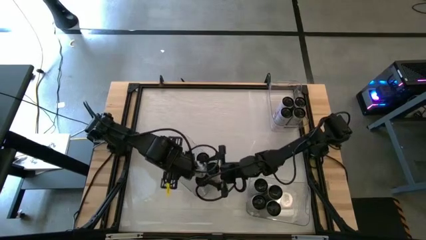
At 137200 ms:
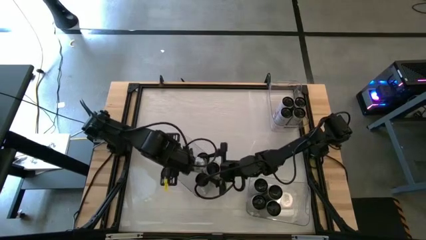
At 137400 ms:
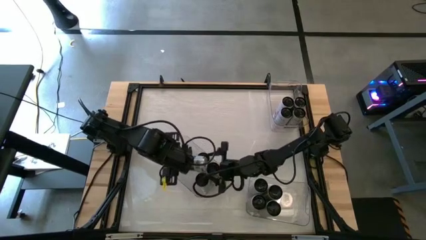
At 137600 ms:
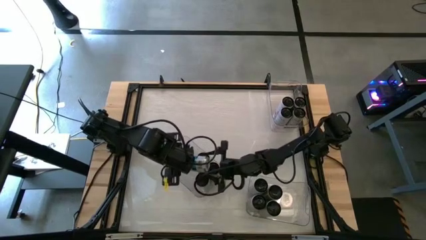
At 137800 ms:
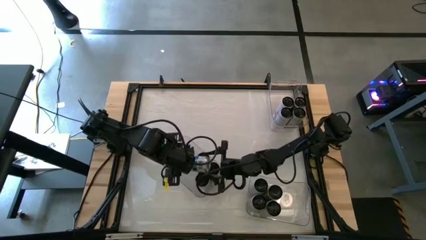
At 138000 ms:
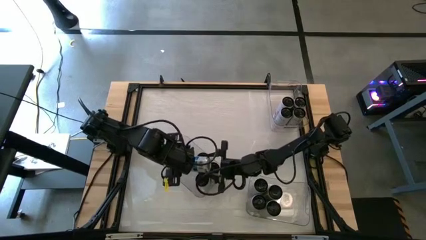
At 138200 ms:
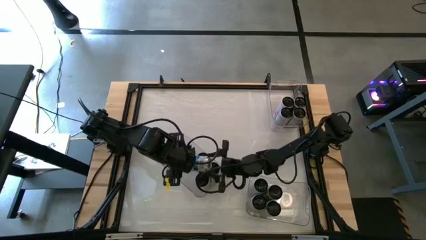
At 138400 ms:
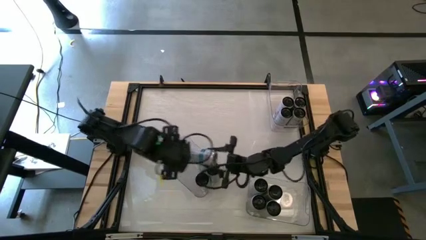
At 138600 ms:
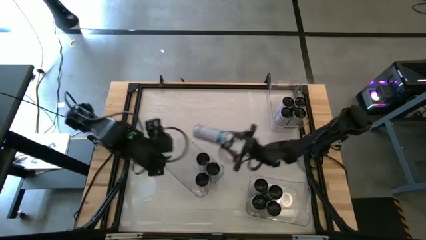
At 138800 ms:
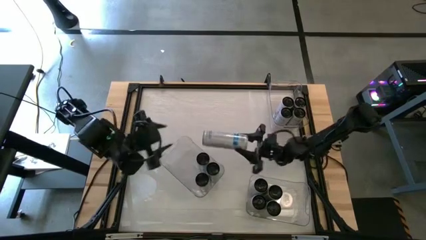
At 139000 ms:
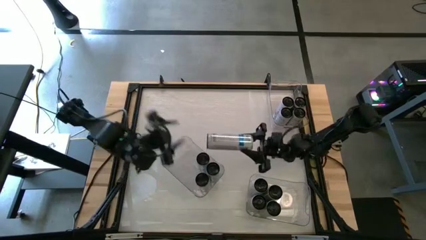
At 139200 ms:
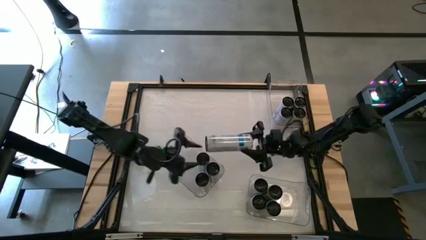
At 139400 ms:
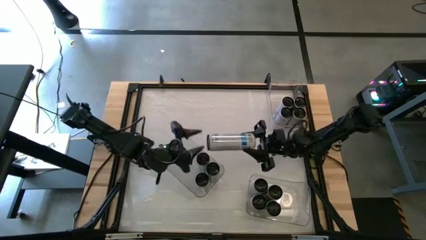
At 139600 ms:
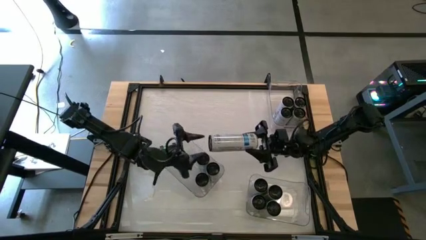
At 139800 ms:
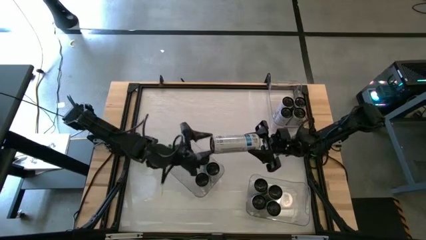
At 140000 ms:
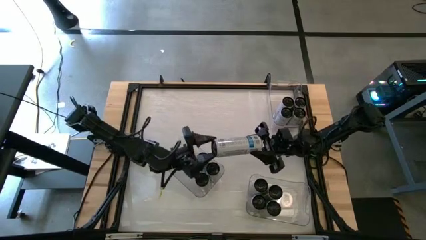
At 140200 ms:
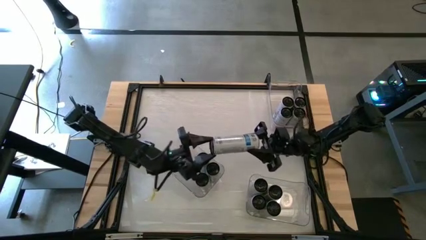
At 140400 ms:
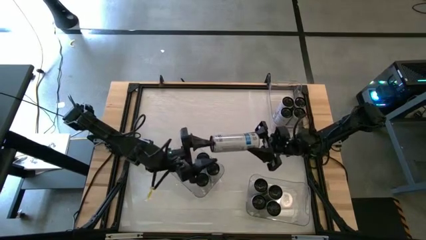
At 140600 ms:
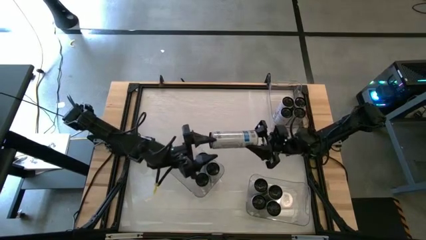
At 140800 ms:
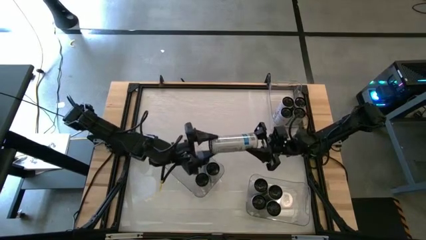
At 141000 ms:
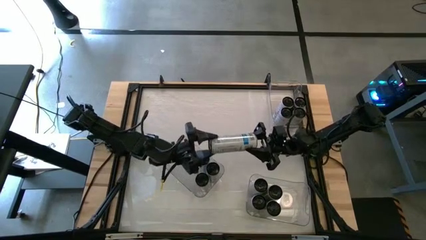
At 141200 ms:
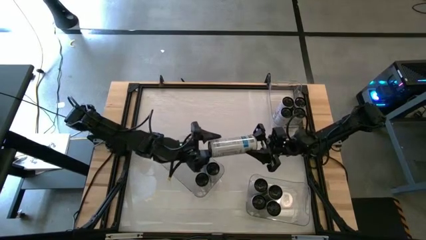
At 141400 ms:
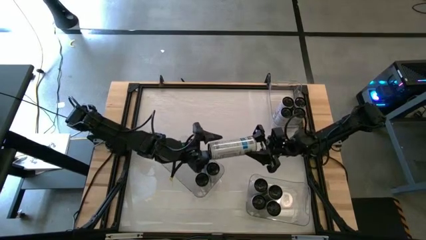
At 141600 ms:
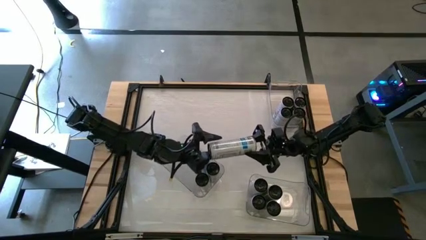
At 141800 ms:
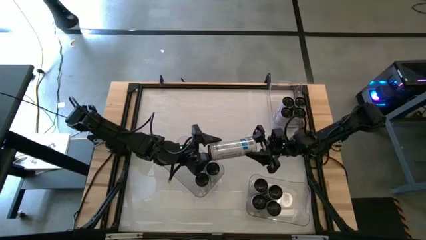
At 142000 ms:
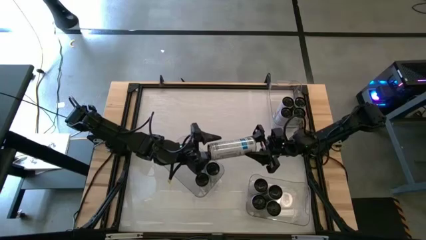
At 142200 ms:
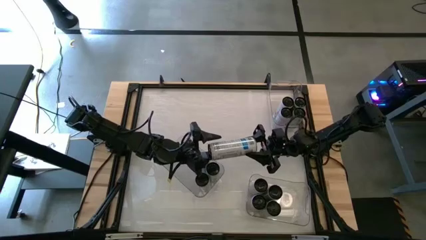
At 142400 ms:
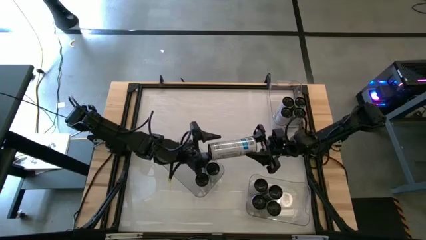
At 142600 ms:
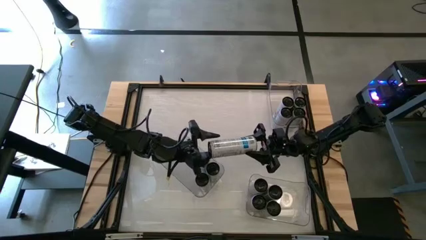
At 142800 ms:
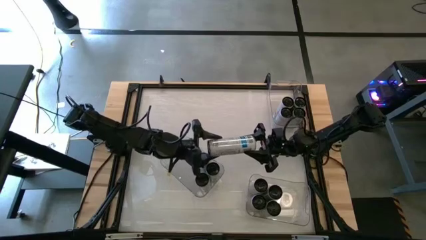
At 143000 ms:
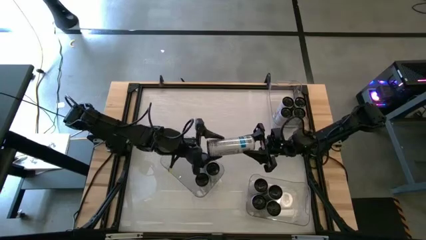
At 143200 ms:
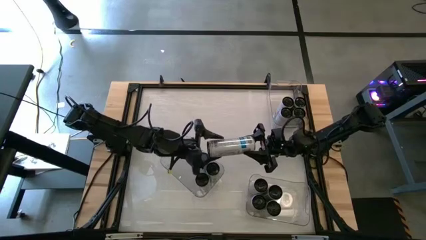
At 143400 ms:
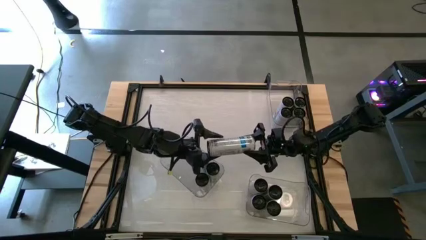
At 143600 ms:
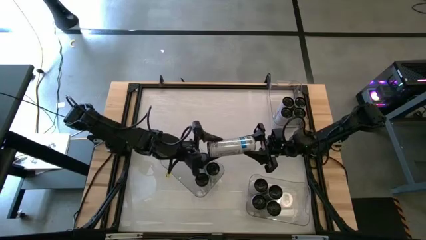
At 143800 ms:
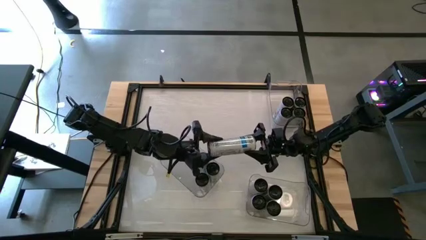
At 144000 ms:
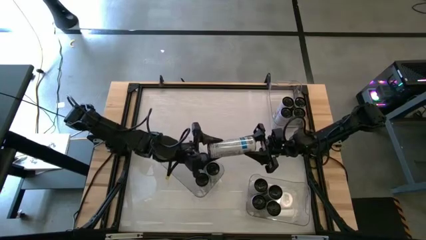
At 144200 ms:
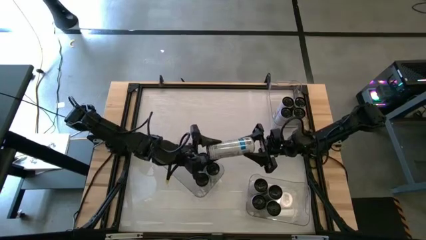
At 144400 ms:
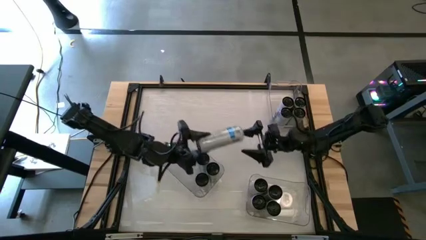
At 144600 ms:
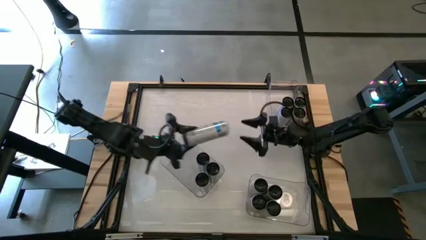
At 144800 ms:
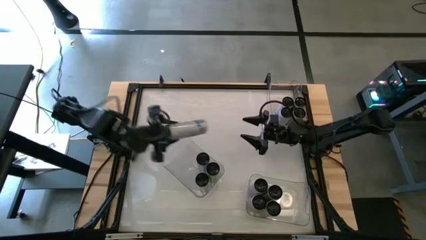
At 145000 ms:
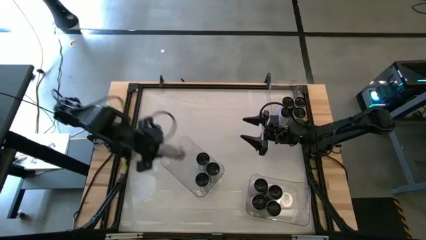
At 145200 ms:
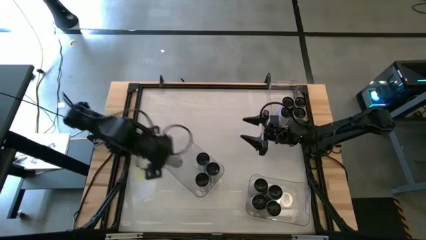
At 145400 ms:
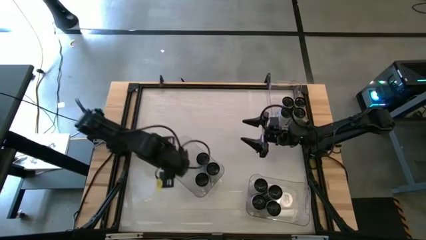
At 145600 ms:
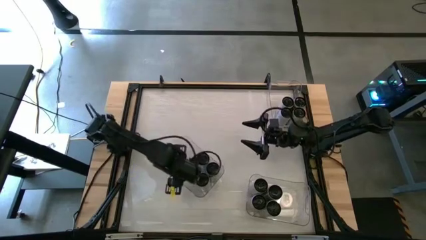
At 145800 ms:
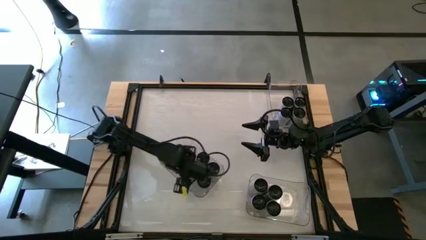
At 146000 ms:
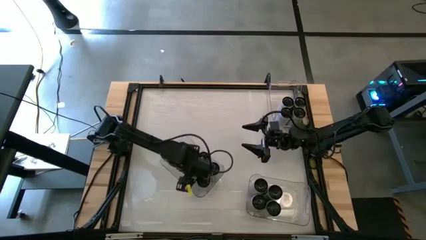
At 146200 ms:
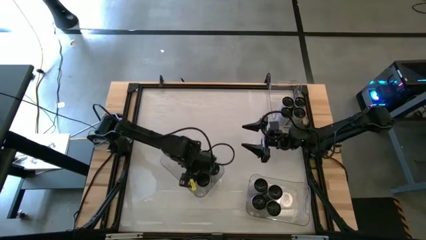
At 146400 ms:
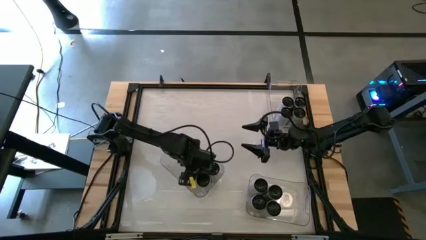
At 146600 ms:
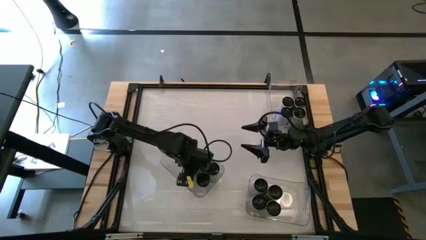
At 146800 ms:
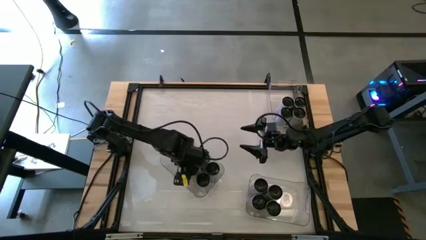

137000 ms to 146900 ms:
Task: Sort soda cans
Adjust the white-blue soda can in the bottom left transparent bin
